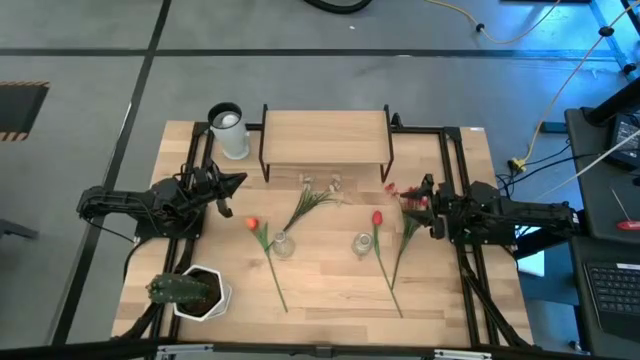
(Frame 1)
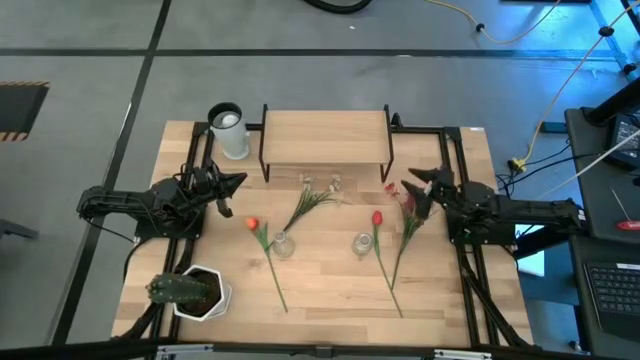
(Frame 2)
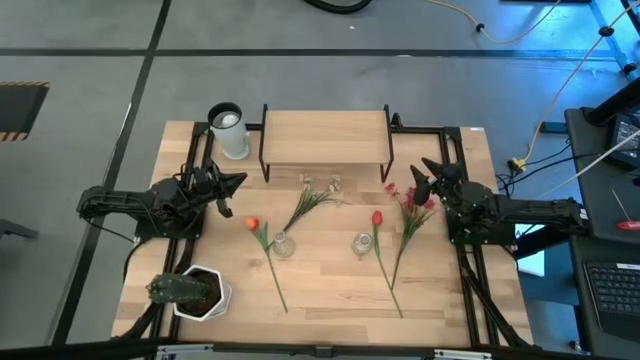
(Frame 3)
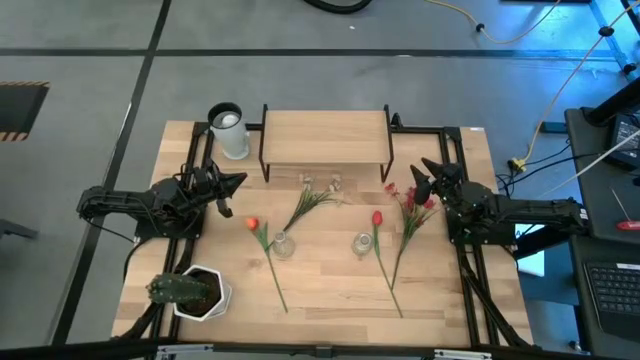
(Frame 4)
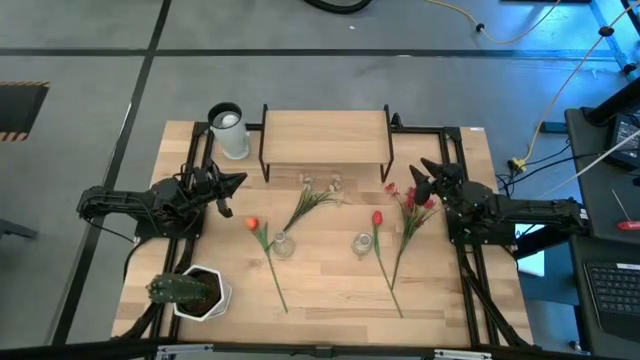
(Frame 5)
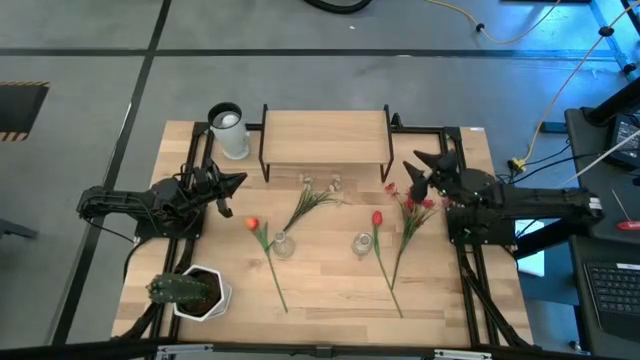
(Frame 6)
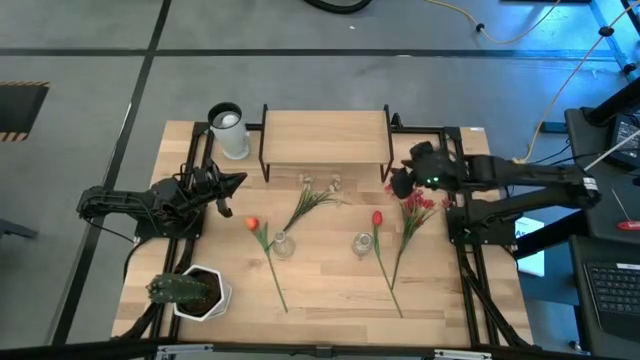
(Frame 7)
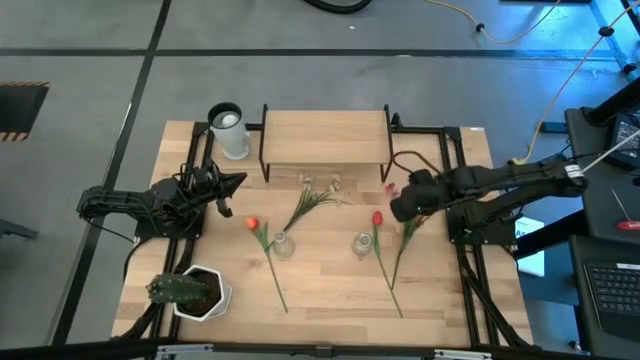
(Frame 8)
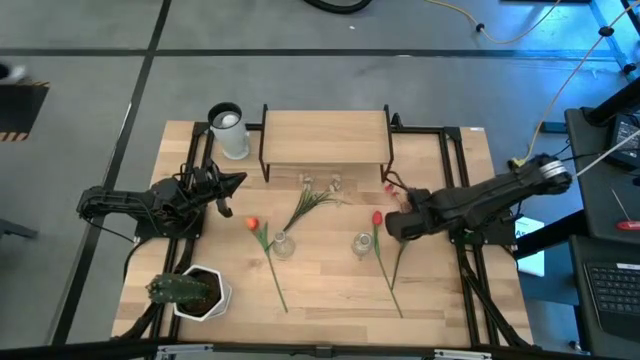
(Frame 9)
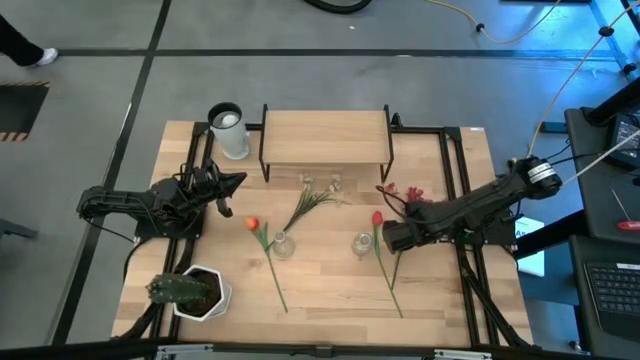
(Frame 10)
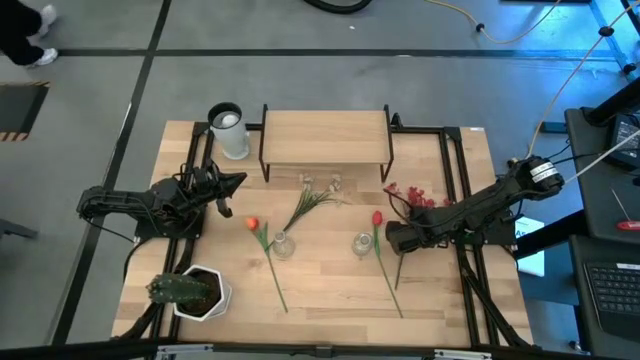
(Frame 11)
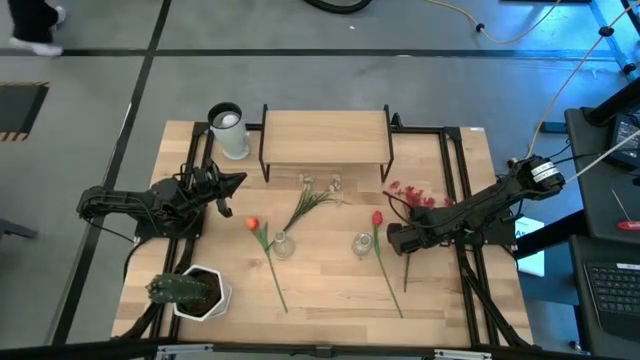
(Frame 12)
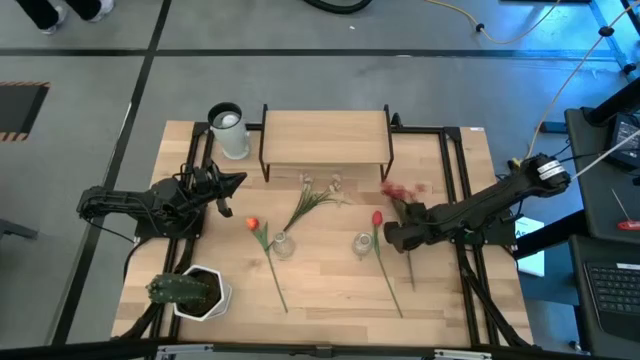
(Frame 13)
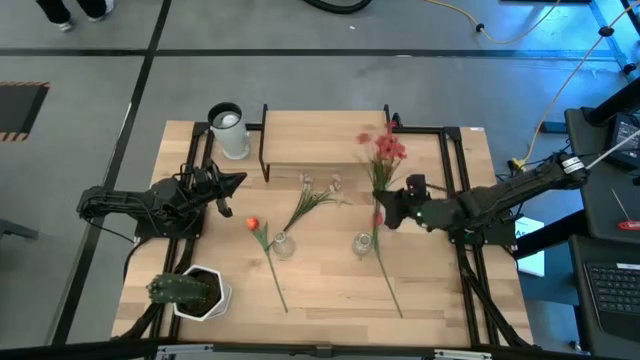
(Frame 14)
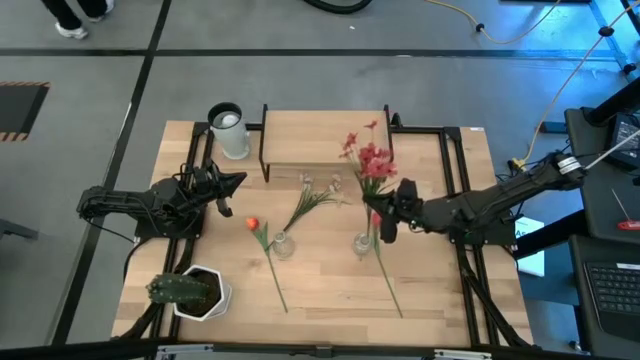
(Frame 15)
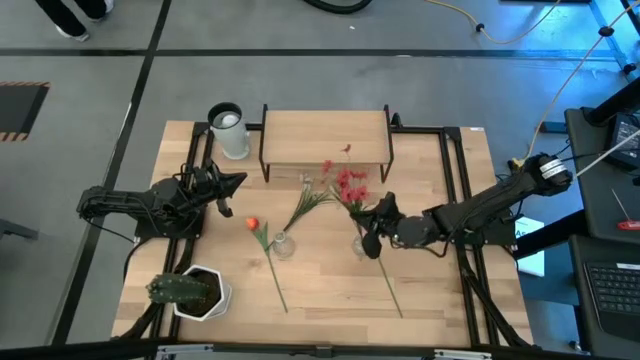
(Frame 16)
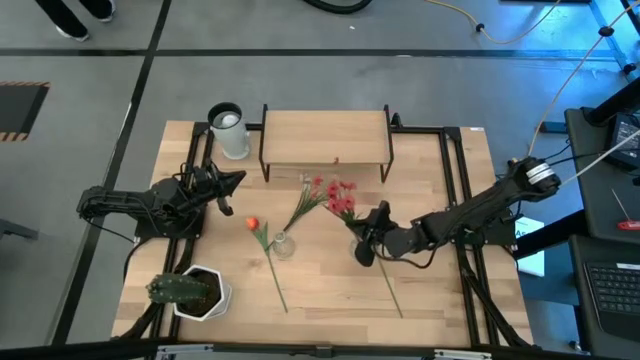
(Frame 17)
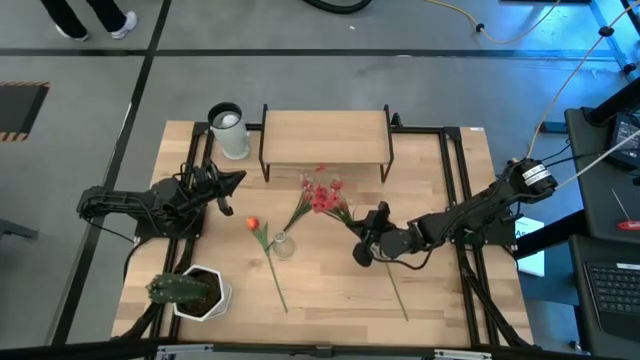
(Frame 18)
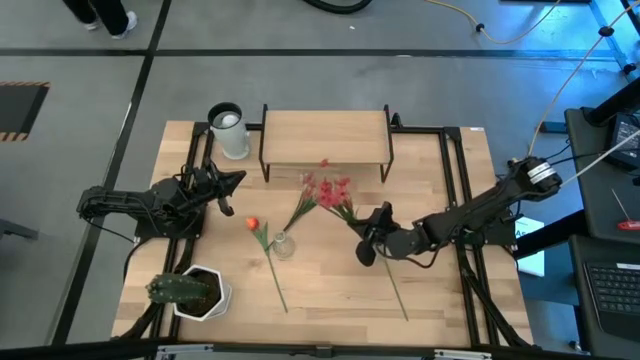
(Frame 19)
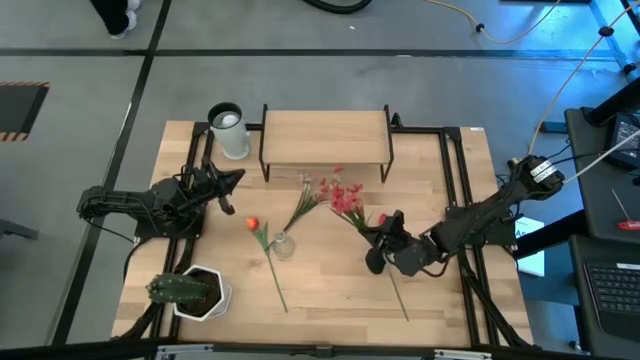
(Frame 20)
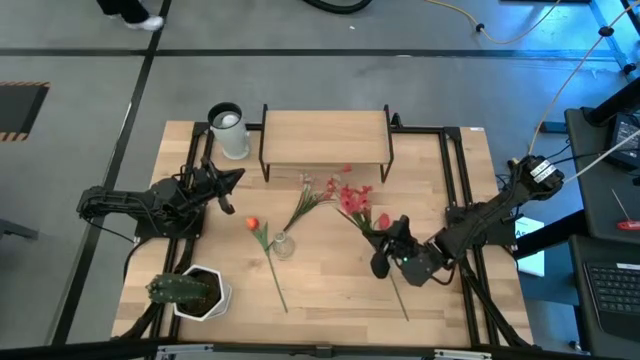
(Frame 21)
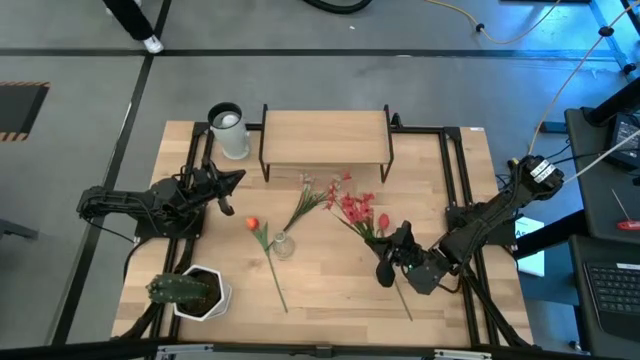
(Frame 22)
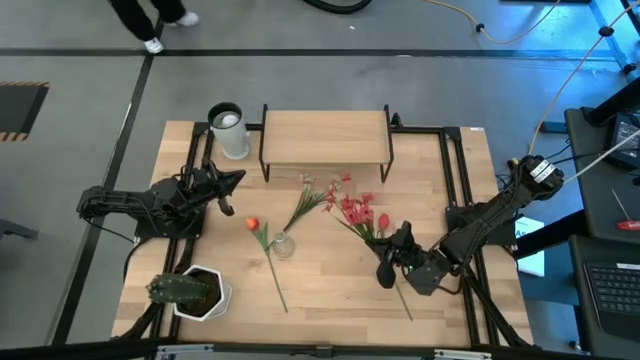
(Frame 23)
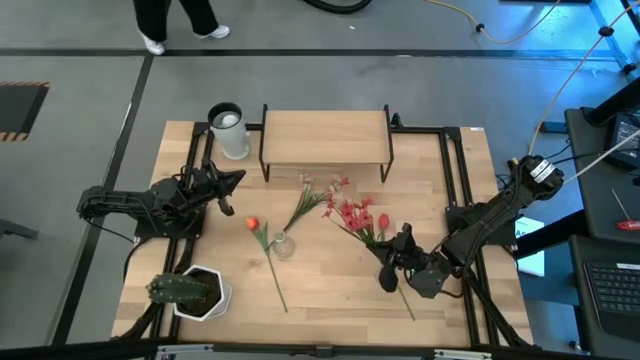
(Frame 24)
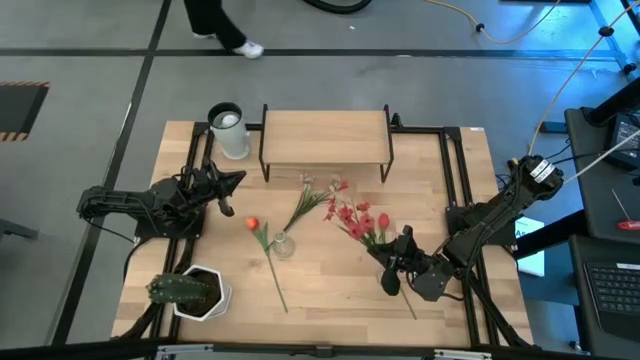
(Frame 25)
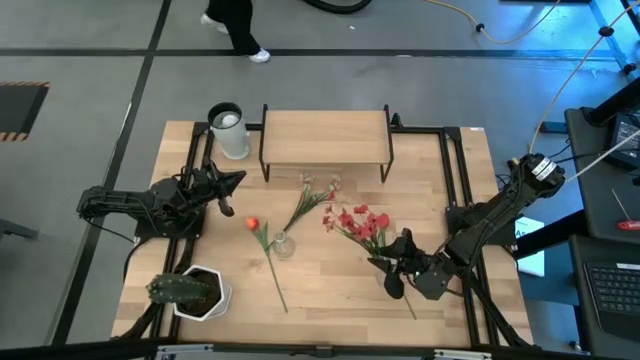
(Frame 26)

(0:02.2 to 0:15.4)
Task: Pick and place flowers into a vace then onto a shelf
Put the red flowers into the right transparent vase

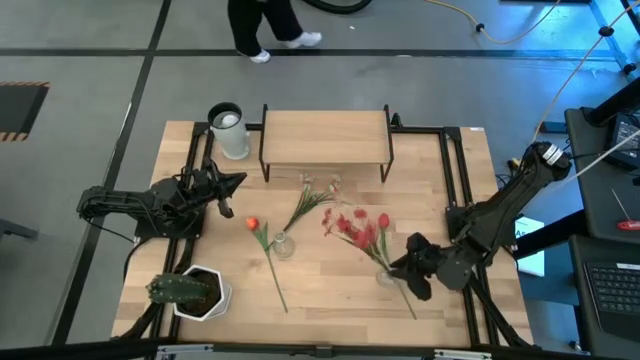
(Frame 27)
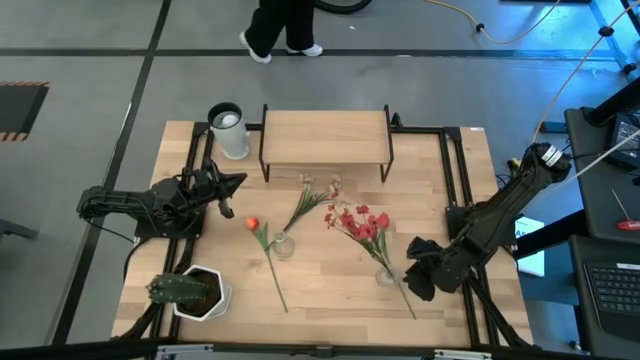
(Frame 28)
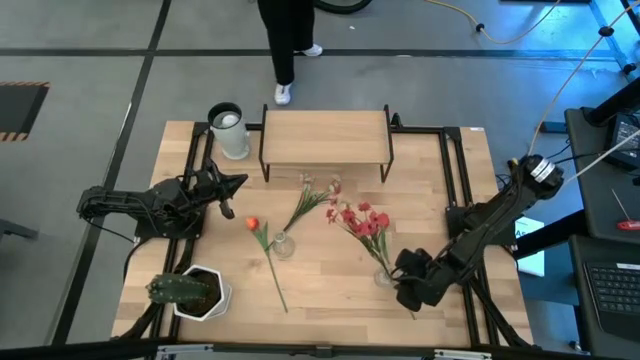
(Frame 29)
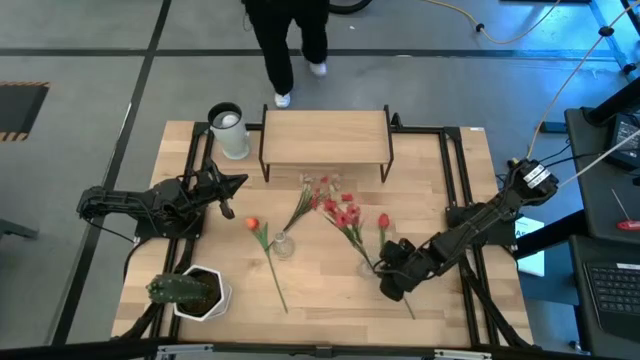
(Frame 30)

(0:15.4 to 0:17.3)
Adjust the right transparent vase

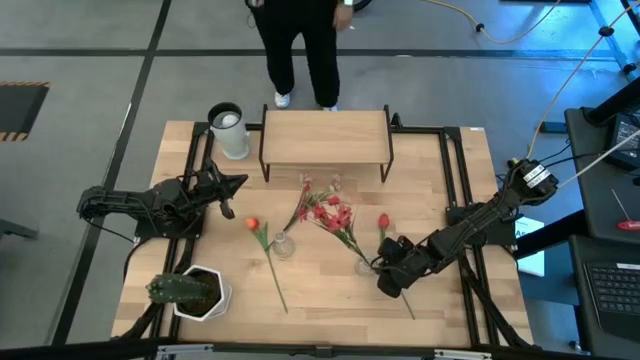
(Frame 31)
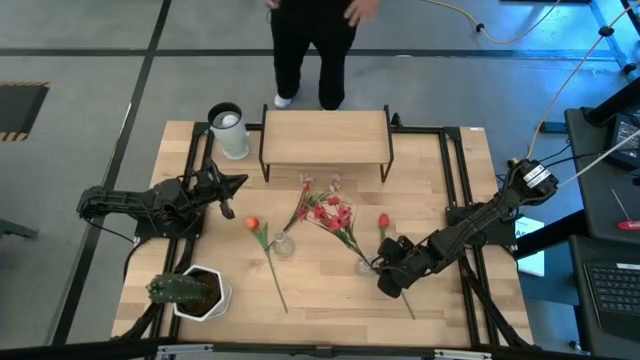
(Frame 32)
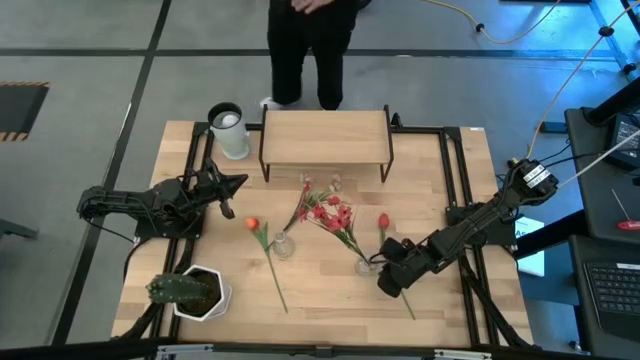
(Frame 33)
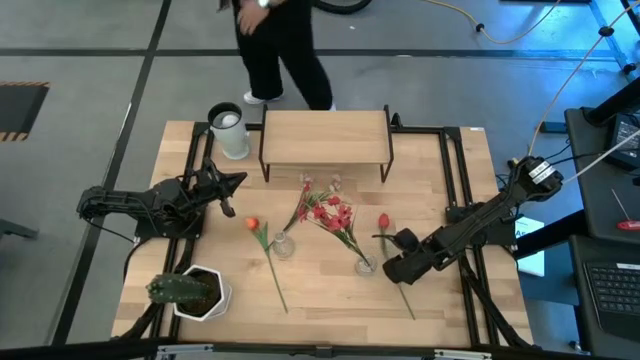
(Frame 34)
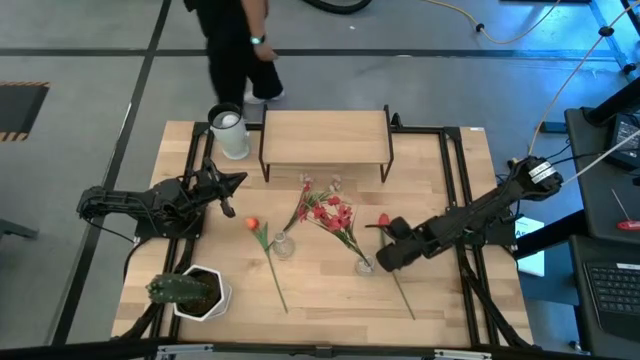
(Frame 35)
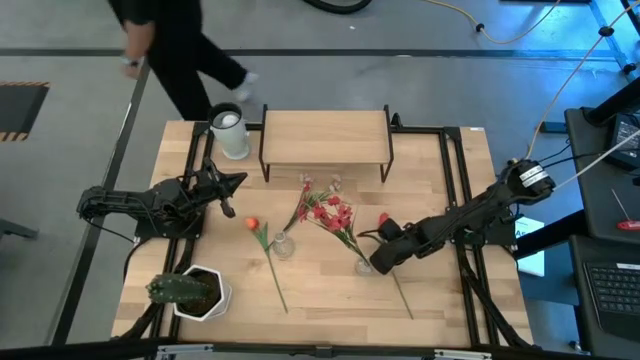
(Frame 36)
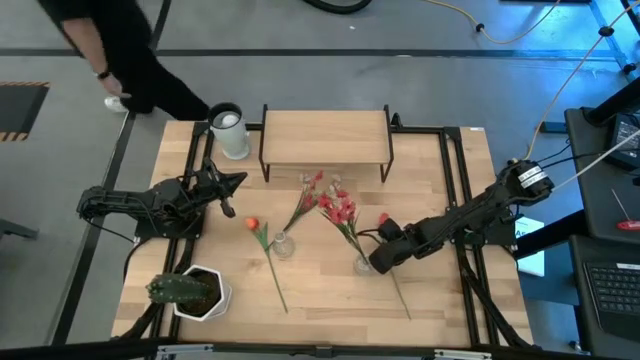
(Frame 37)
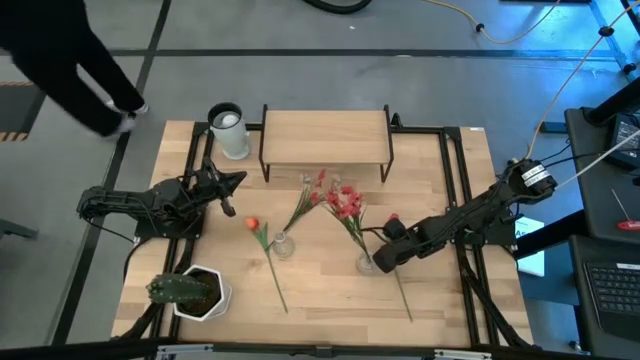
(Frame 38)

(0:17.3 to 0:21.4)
Put the pink flower into the right transparent vase

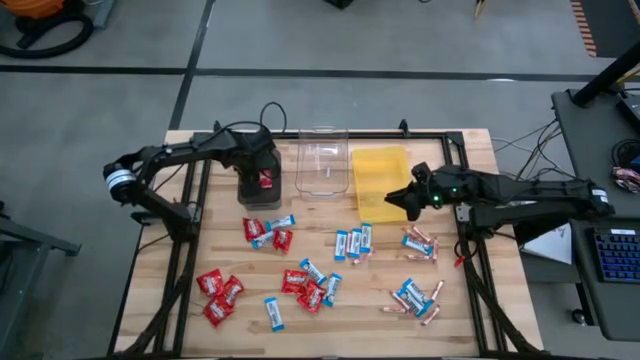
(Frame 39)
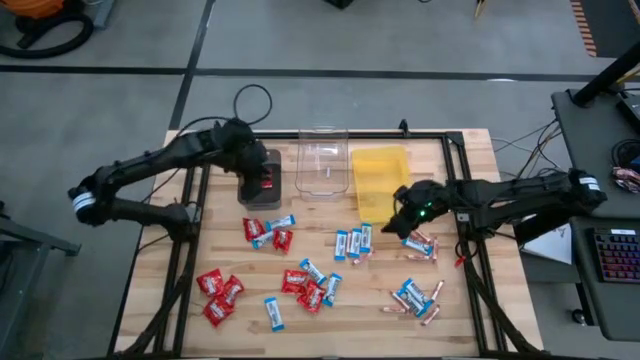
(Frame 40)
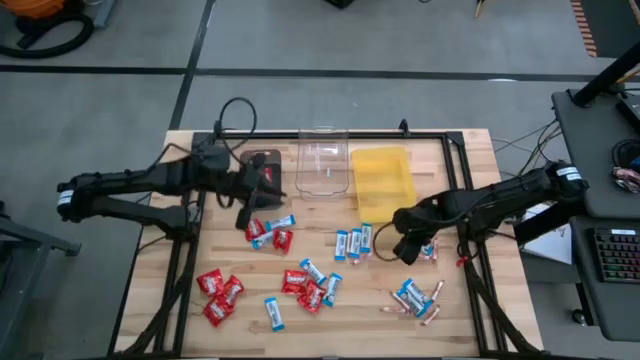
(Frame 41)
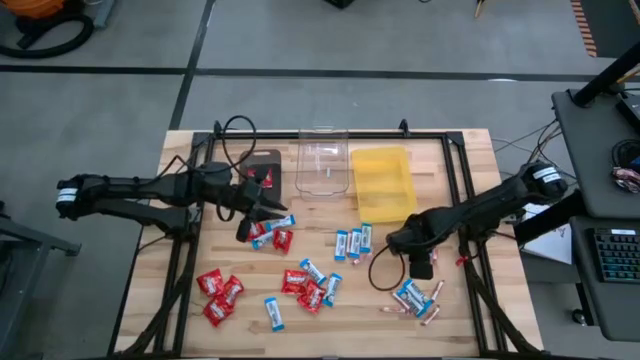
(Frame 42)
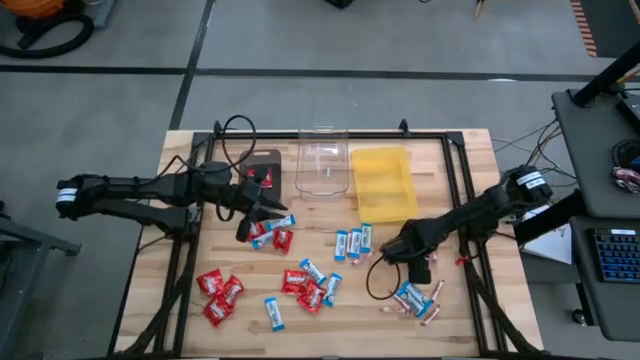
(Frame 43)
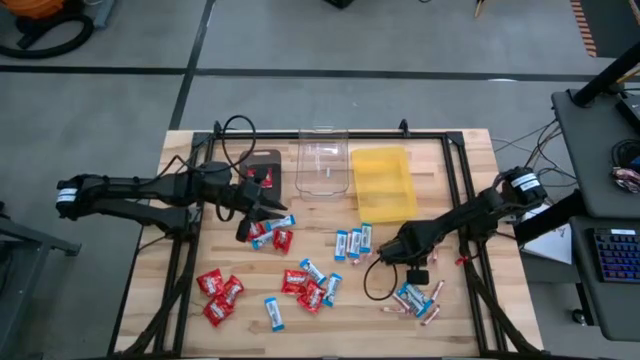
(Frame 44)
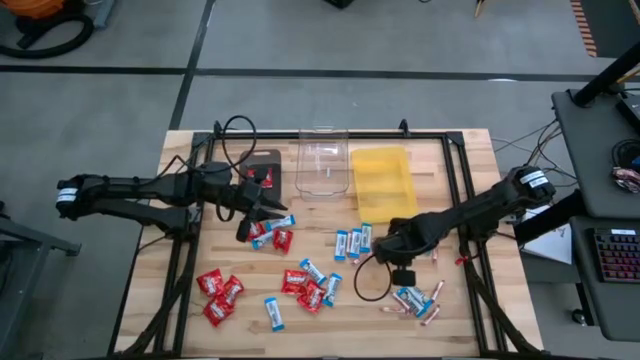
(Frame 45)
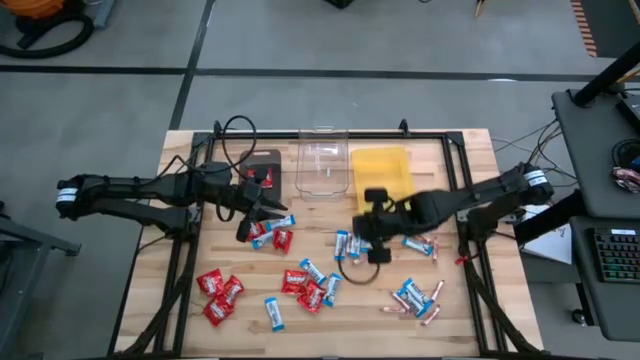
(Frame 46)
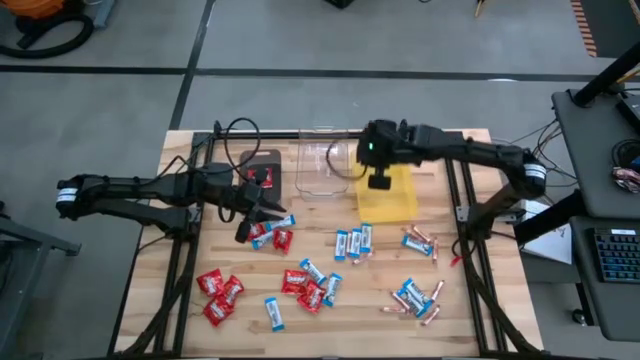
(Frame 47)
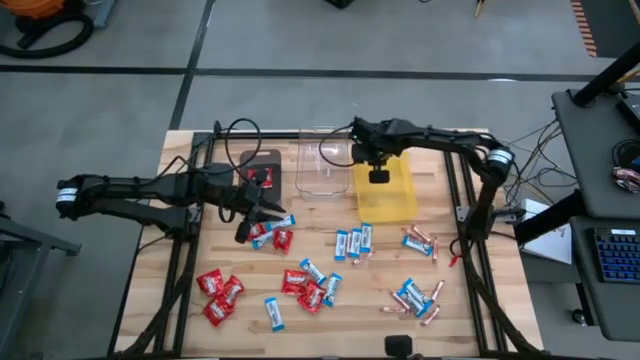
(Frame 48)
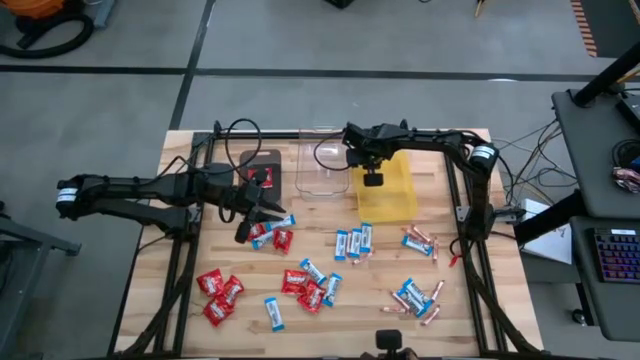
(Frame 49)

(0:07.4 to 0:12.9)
Task: Sort candy
Put the white-red candy into the yellow bin
